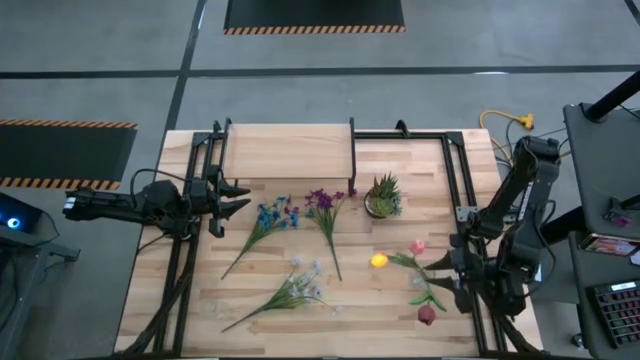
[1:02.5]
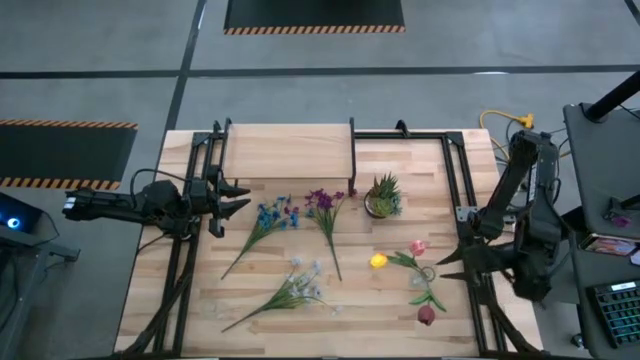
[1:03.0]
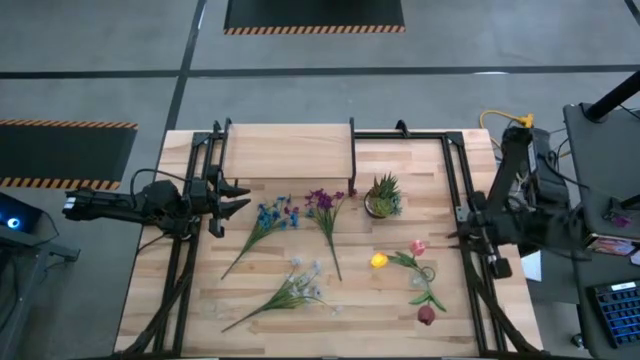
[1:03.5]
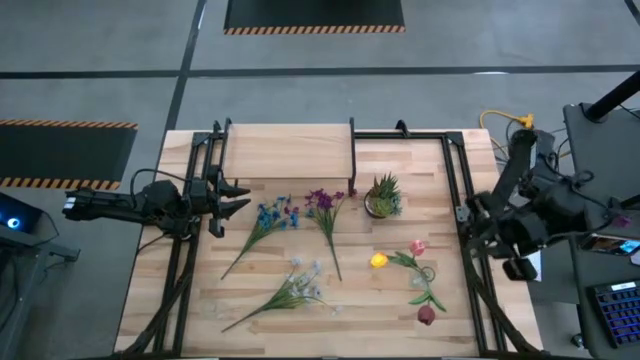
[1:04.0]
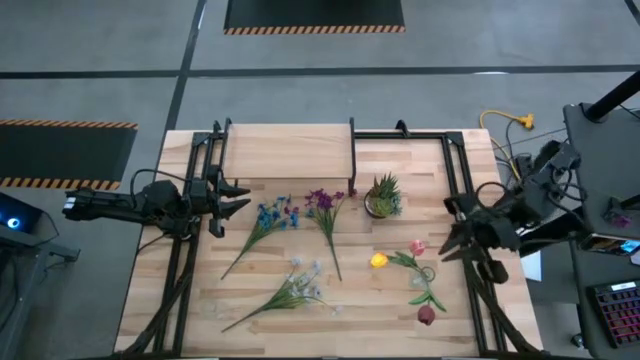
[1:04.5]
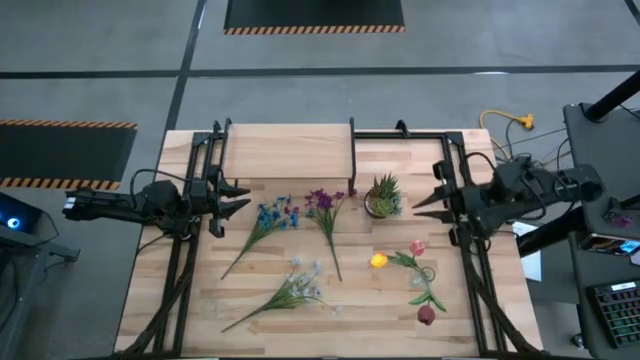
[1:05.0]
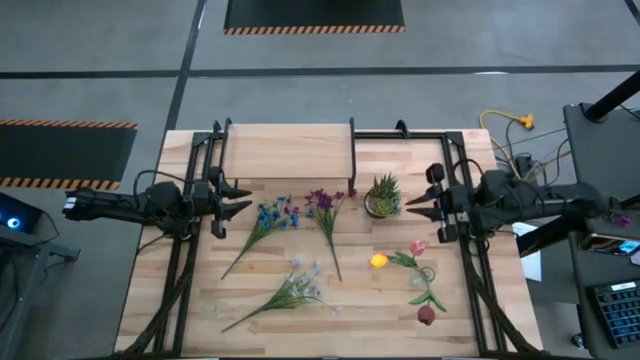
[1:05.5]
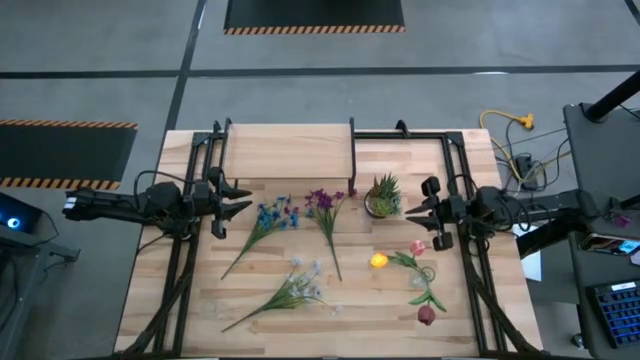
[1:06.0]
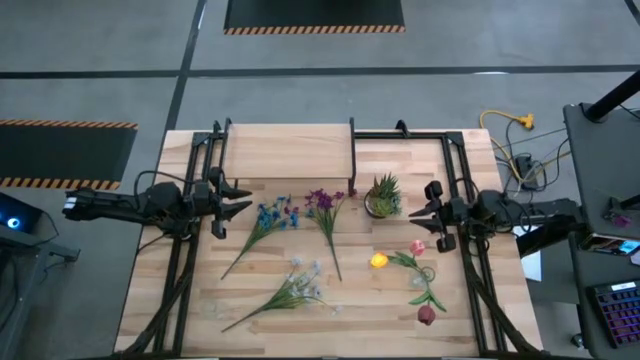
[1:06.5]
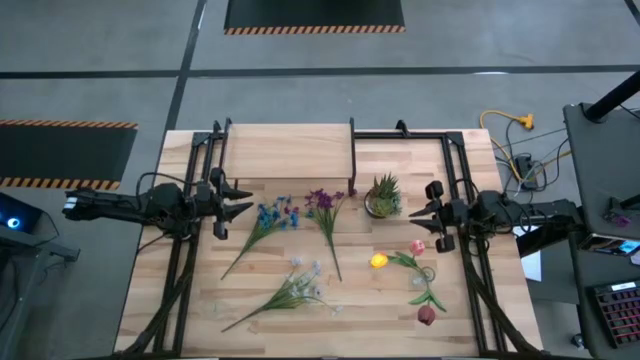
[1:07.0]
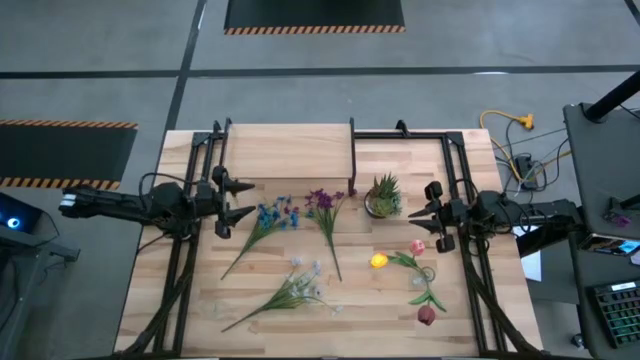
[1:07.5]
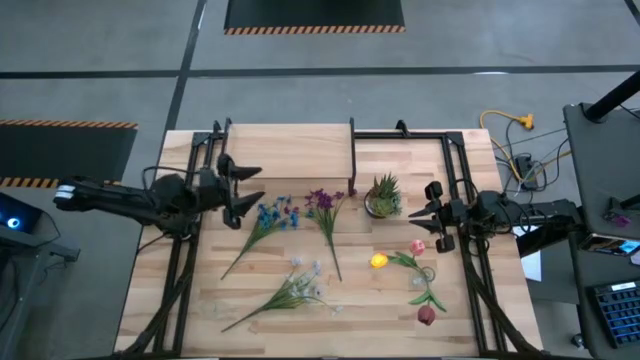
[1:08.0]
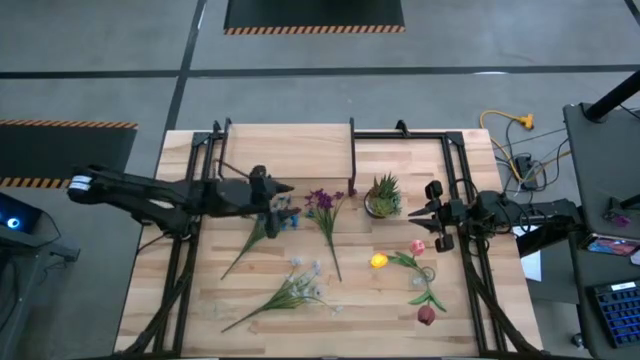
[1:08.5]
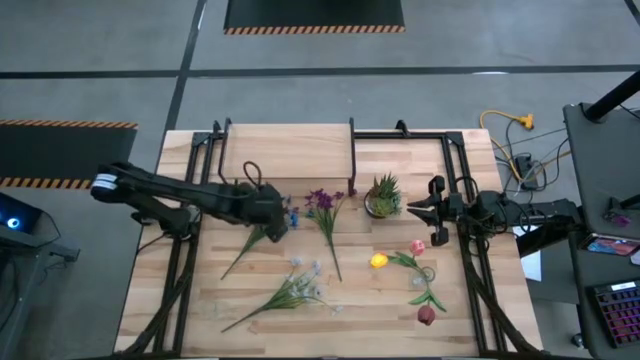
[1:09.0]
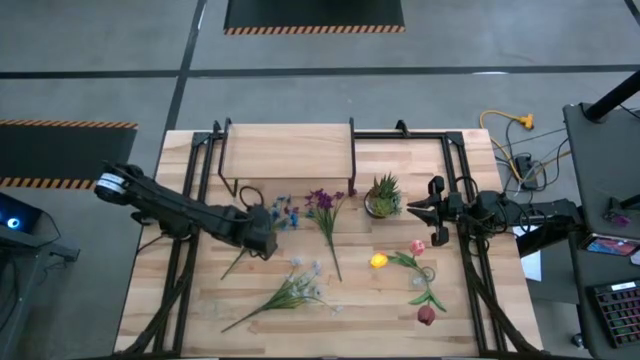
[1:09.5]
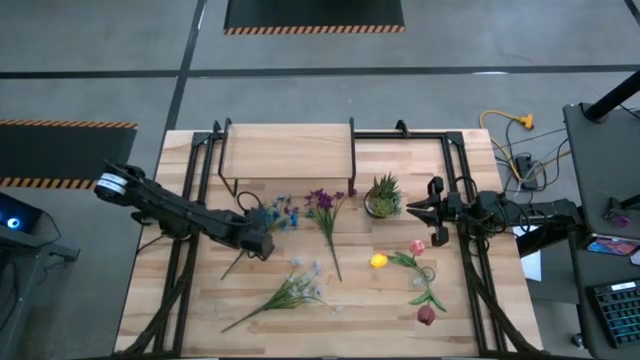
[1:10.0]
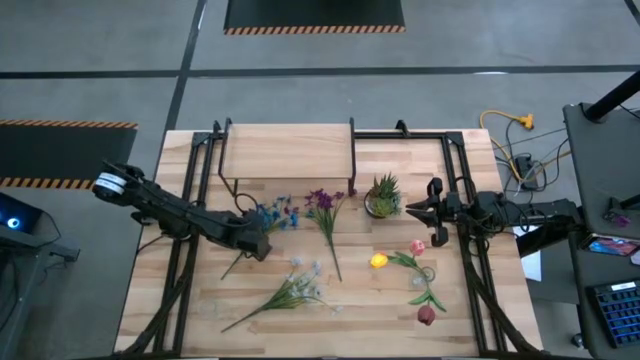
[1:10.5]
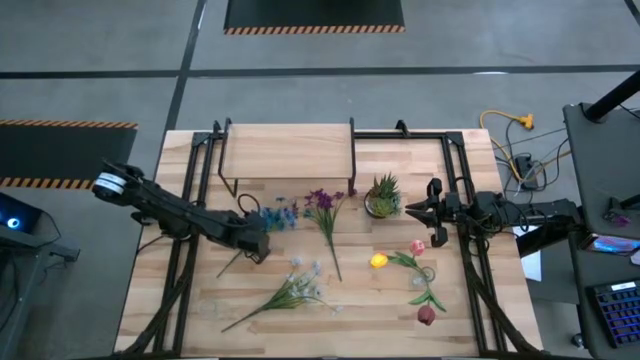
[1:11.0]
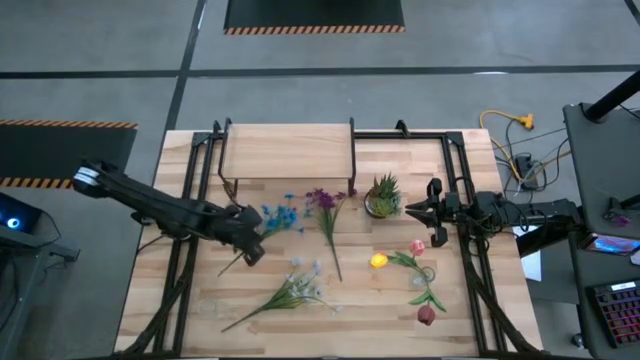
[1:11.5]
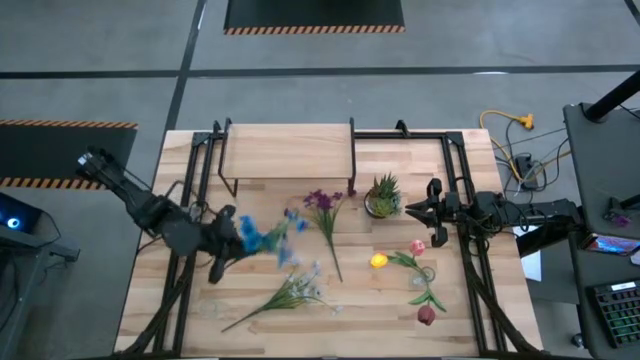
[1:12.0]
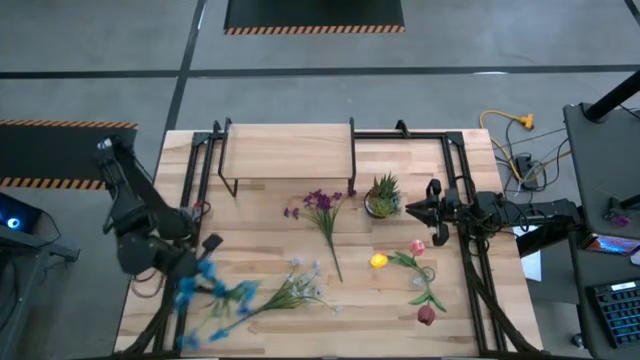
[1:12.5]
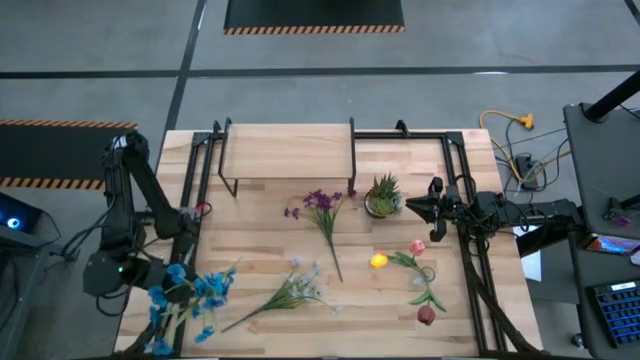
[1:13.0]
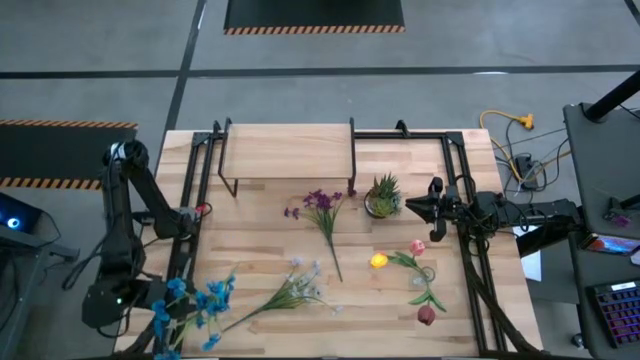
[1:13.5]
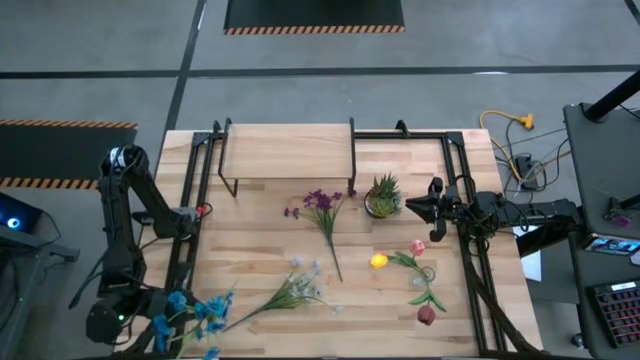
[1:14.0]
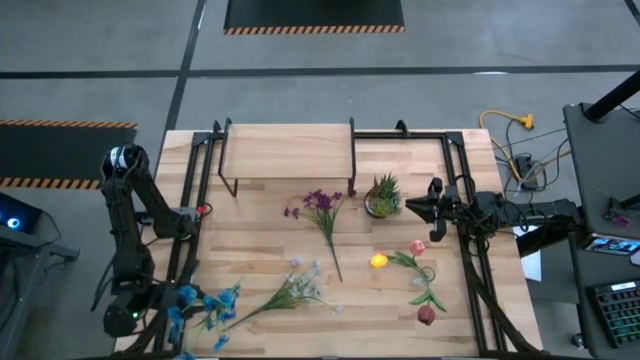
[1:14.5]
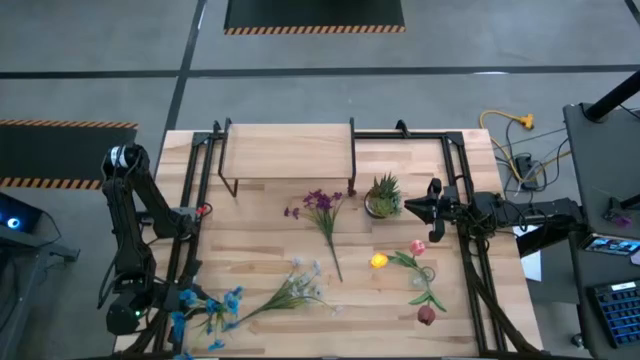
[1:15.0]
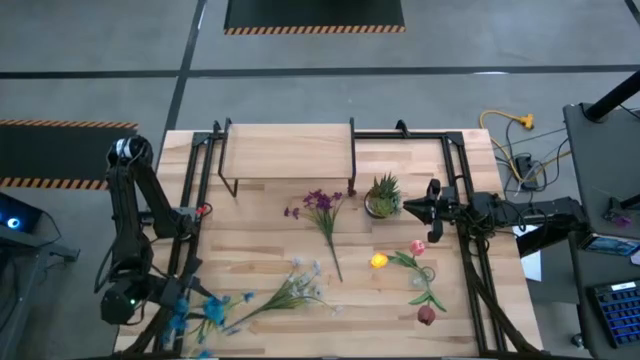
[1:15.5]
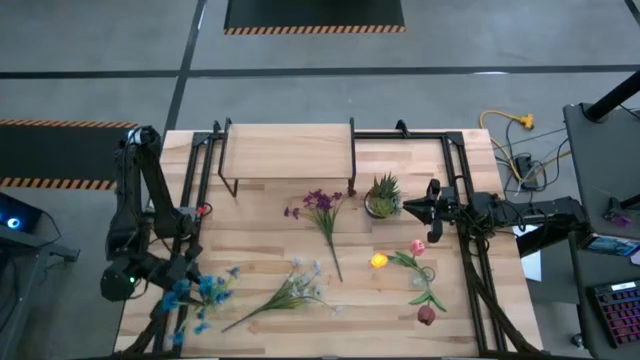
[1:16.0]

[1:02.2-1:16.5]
Task: Pick and place flowers into a vace then onto a shelf
Put the blue flowers into the left transparent vase

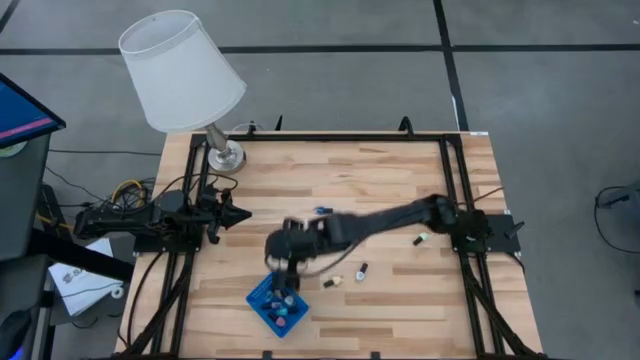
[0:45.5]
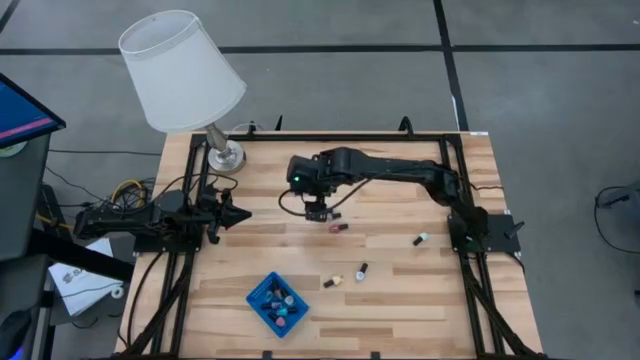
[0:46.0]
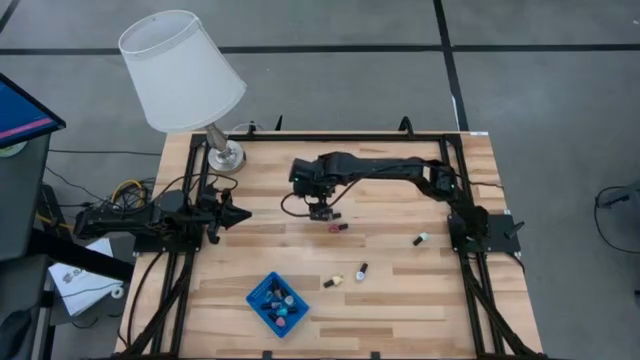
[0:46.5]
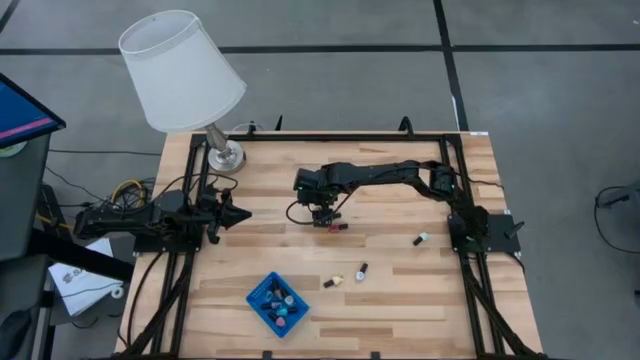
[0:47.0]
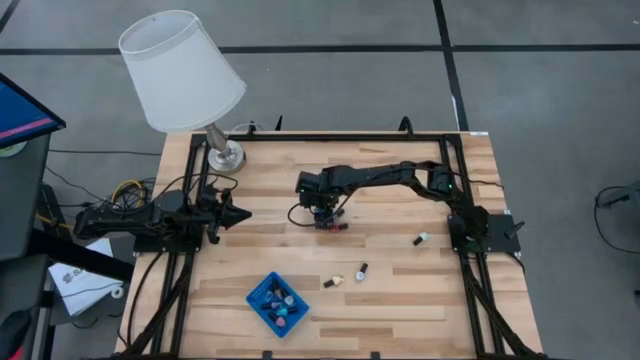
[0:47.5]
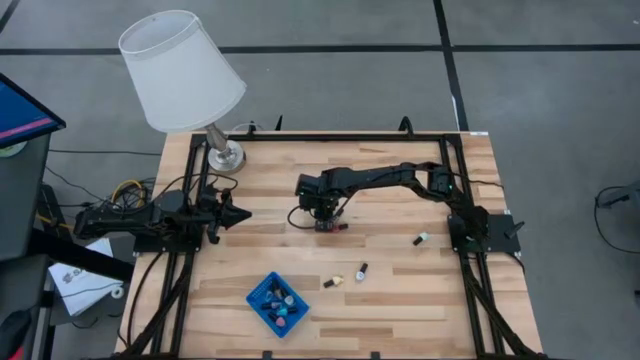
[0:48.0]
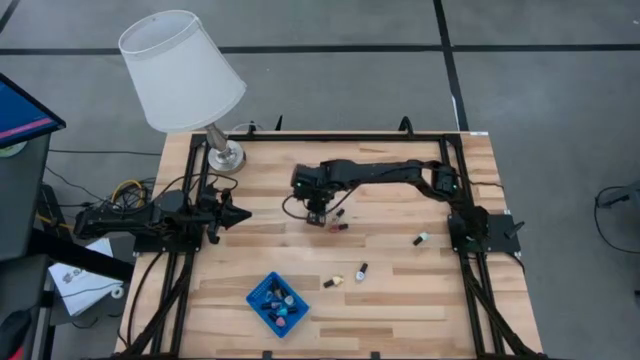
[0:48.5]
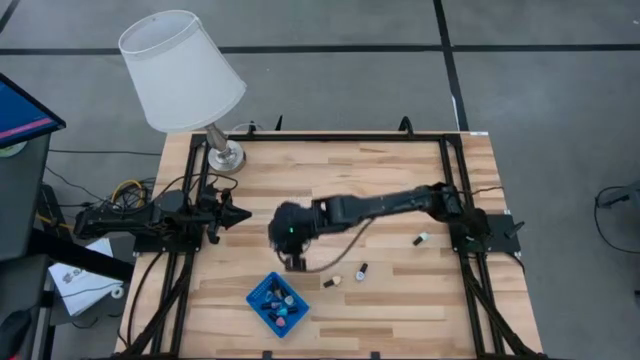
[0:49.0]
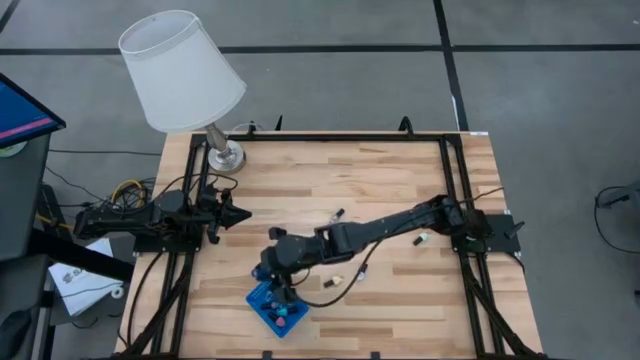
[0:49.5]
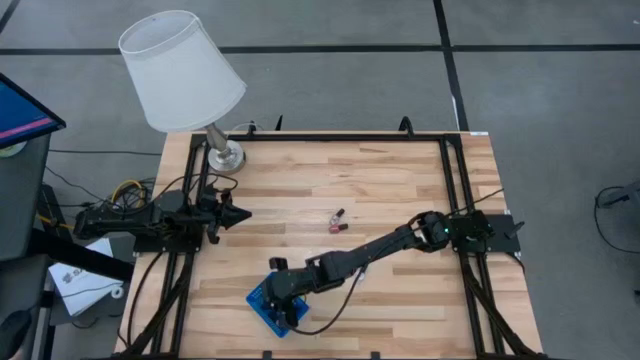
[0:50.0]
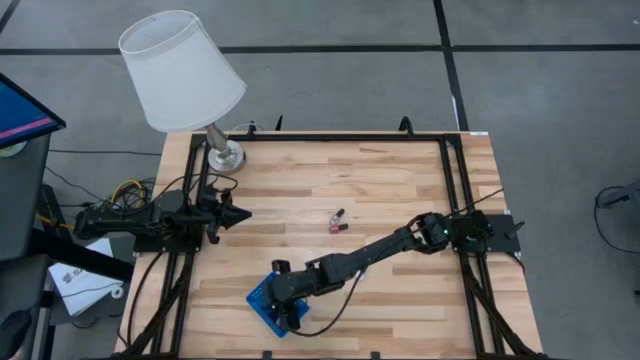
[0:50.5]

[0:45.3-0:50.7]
Task: Pick & Place Nail Polish
Put the blue nail polish bottle in the blue bin

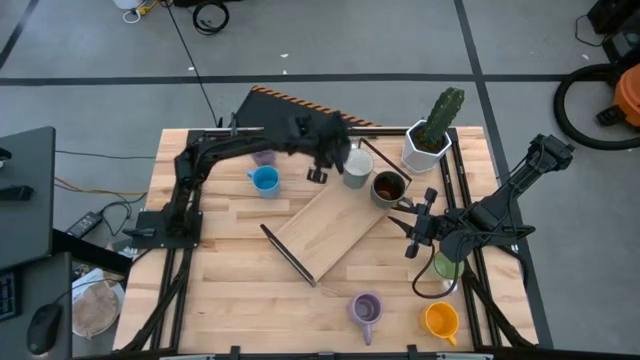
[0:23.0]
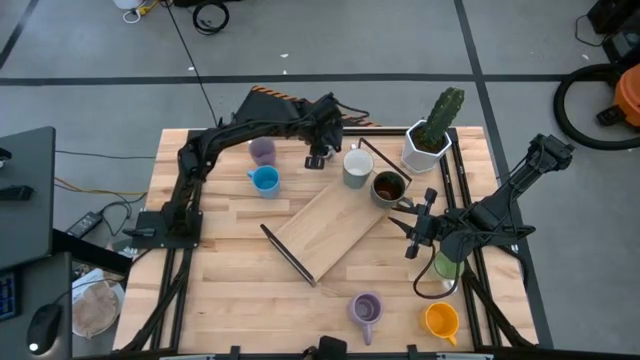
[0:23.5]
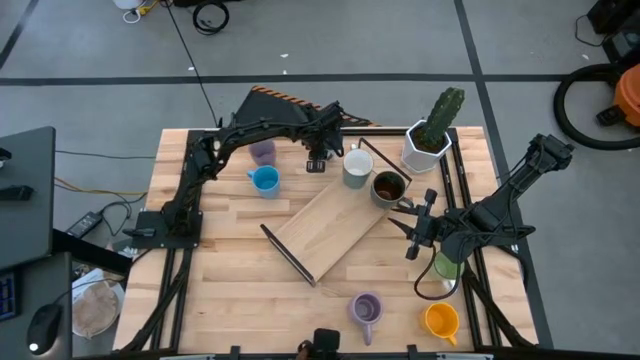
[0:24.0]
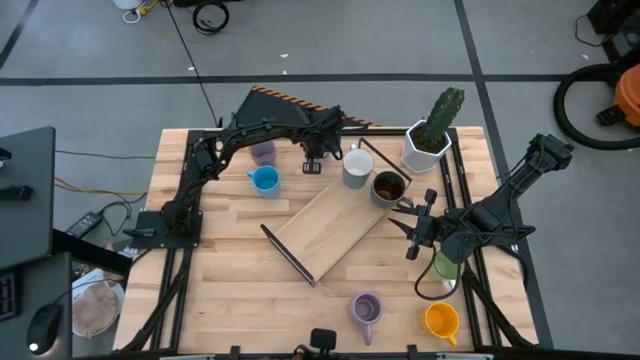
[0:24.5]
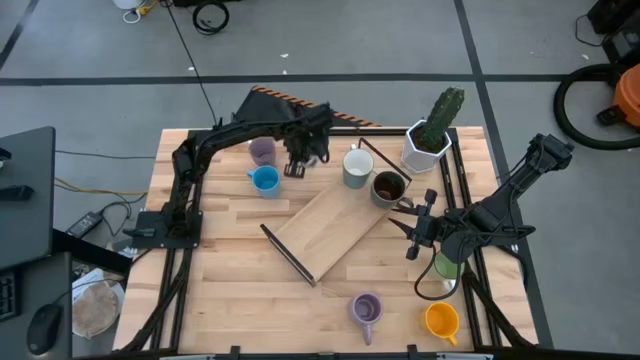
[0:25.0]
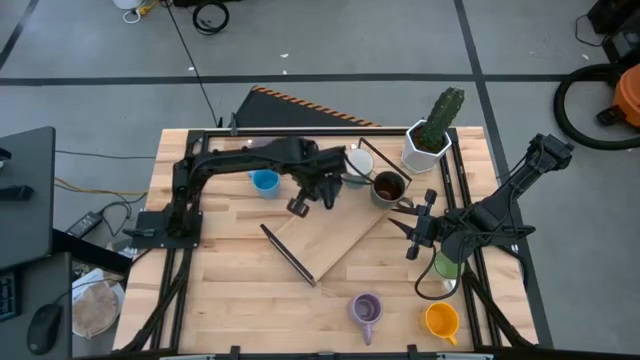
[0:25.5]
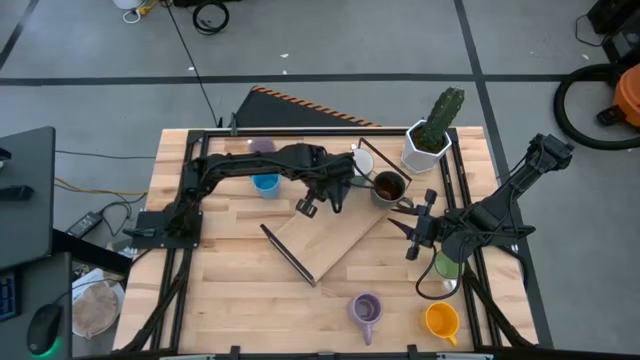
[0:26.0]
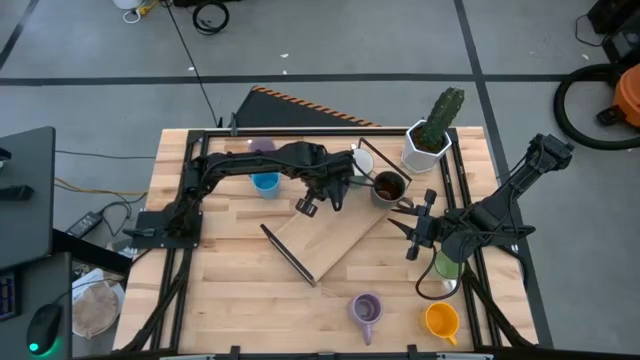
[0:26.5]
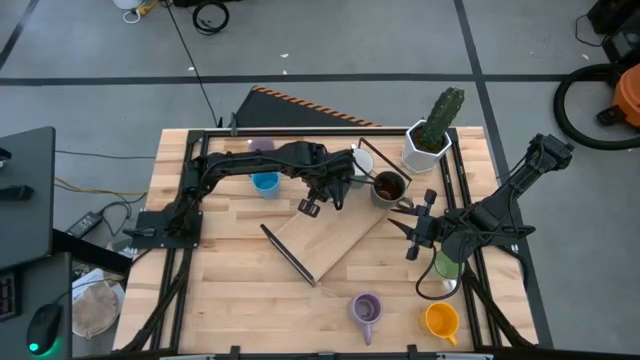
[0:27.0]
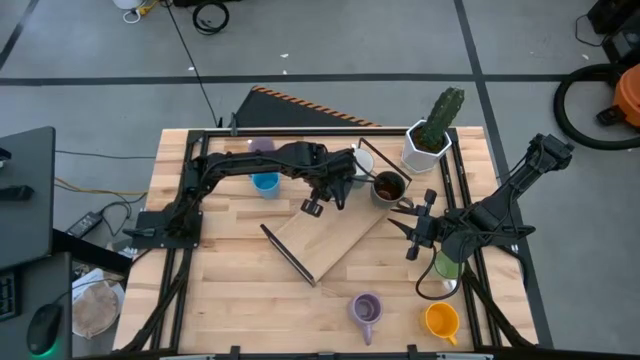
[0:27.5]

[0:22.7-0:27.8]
Task: Place coffee mugs
Put the blue white mug on the shelf
